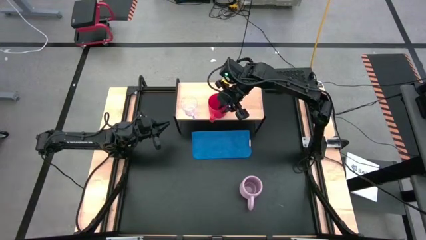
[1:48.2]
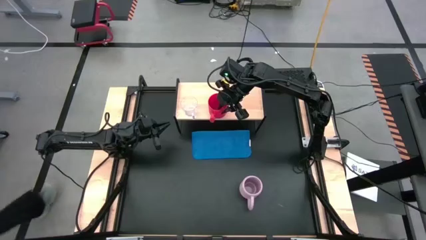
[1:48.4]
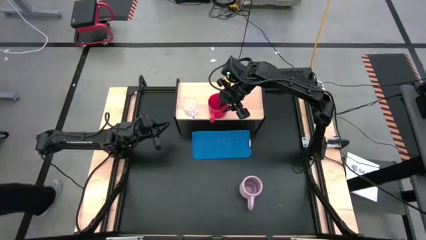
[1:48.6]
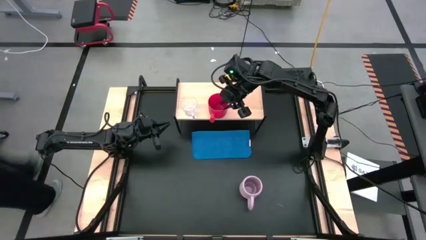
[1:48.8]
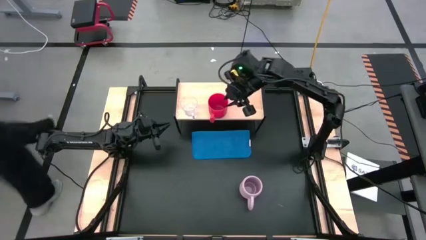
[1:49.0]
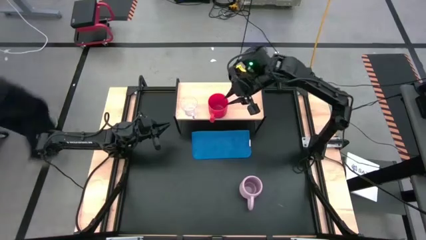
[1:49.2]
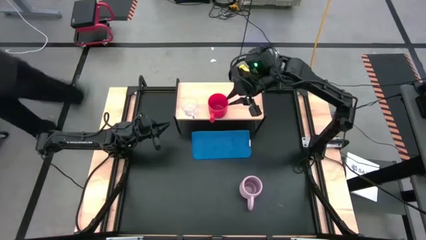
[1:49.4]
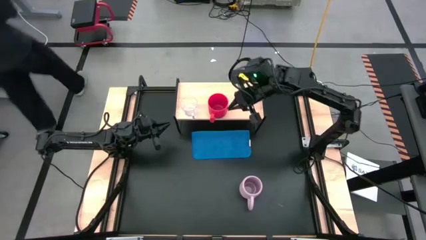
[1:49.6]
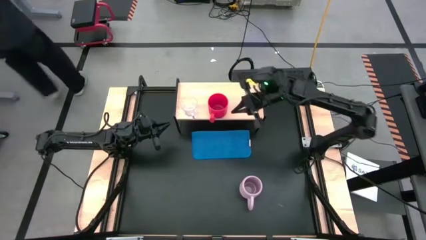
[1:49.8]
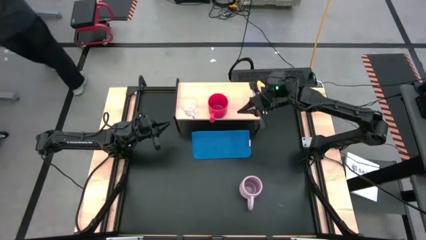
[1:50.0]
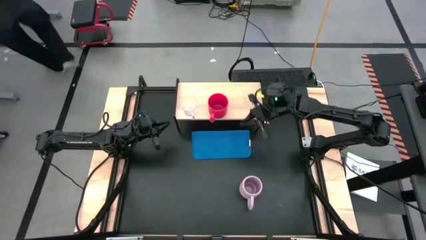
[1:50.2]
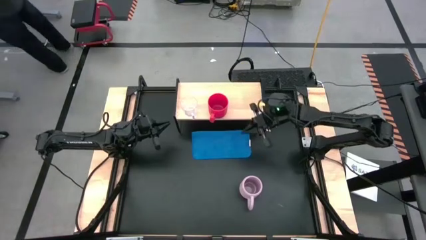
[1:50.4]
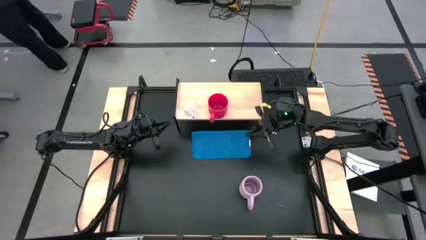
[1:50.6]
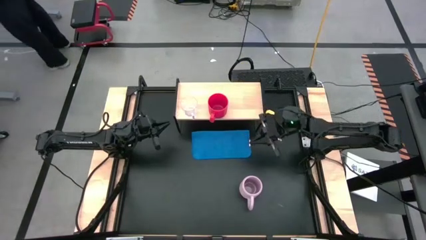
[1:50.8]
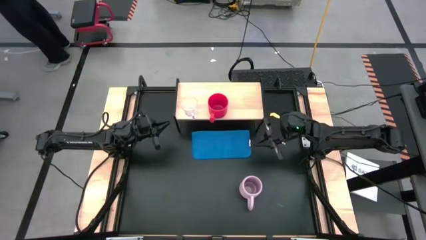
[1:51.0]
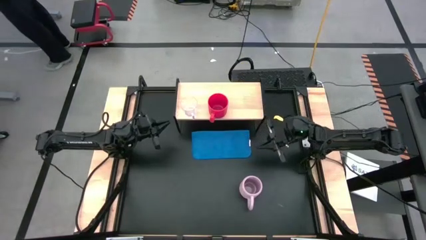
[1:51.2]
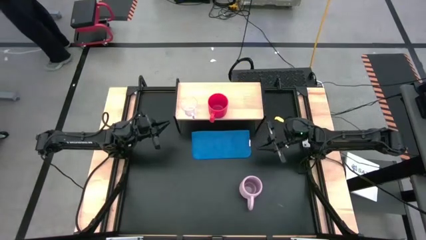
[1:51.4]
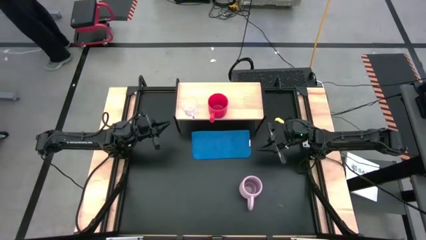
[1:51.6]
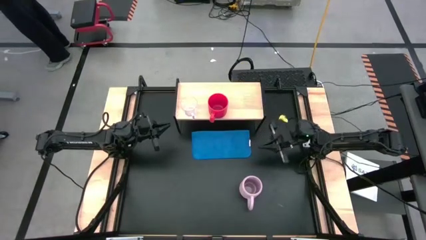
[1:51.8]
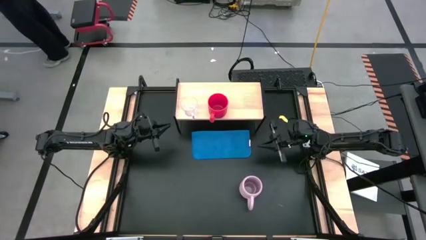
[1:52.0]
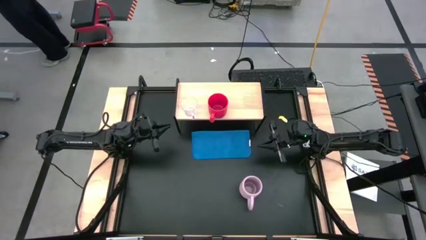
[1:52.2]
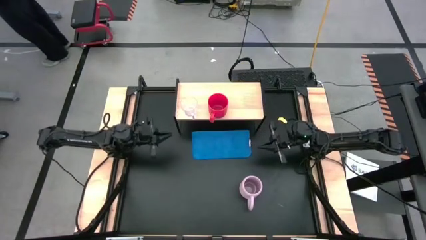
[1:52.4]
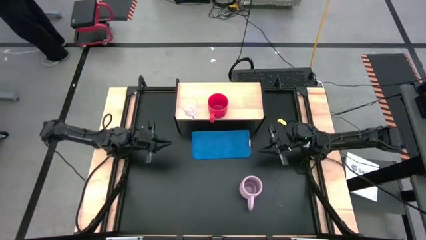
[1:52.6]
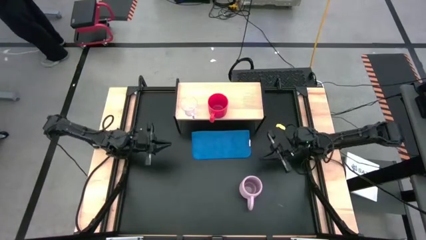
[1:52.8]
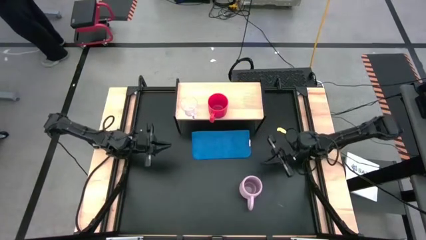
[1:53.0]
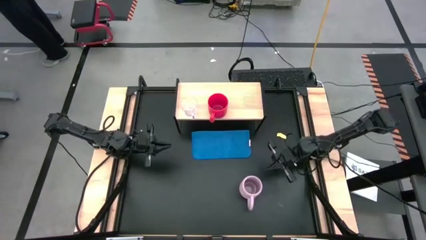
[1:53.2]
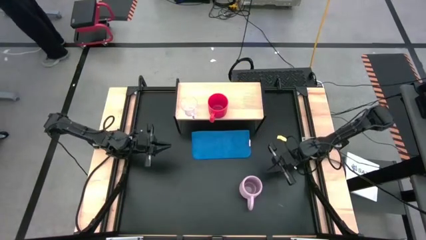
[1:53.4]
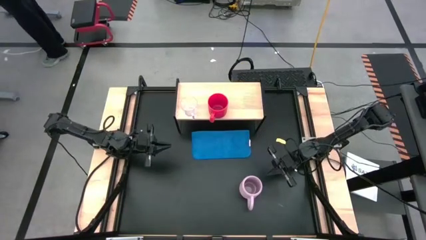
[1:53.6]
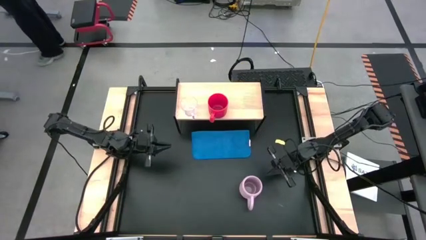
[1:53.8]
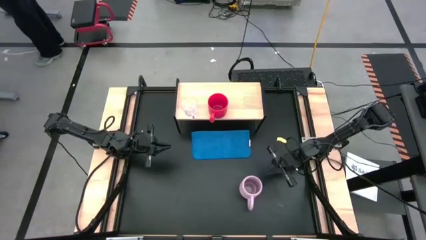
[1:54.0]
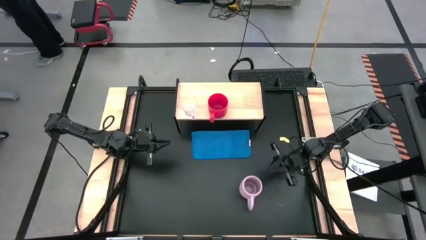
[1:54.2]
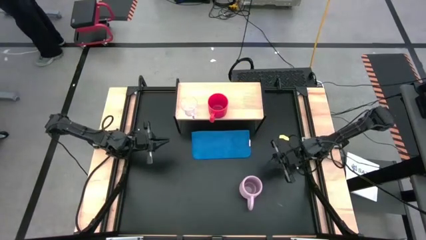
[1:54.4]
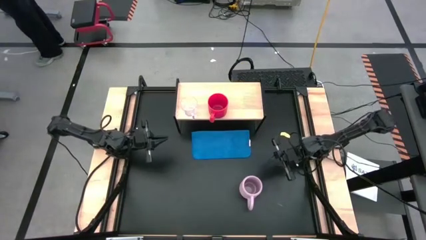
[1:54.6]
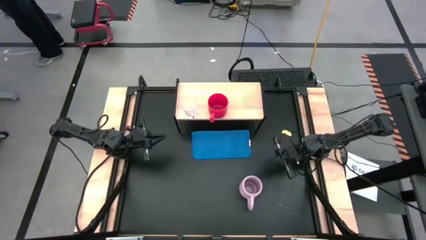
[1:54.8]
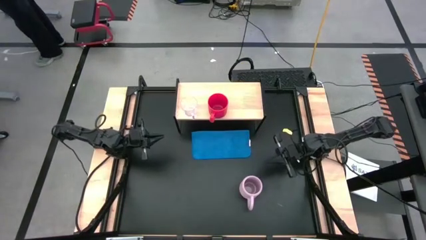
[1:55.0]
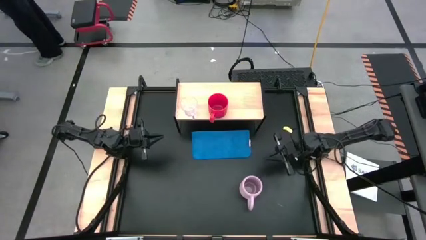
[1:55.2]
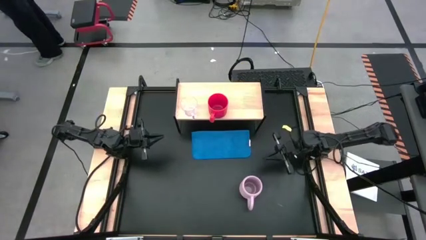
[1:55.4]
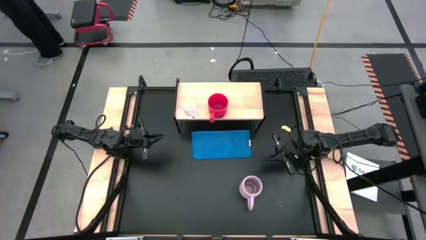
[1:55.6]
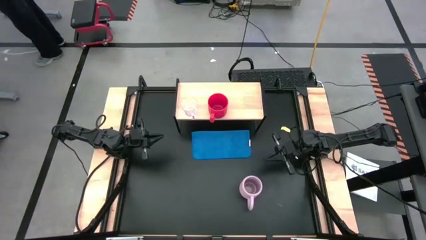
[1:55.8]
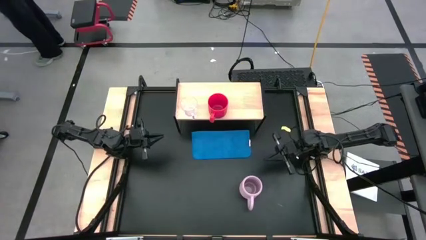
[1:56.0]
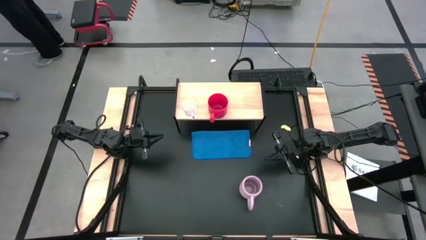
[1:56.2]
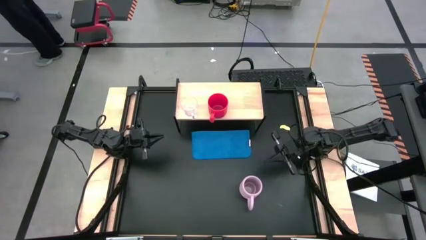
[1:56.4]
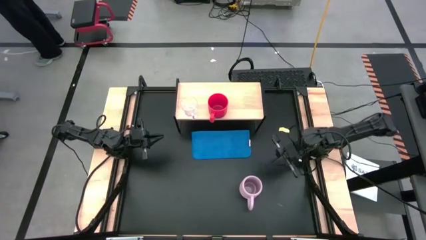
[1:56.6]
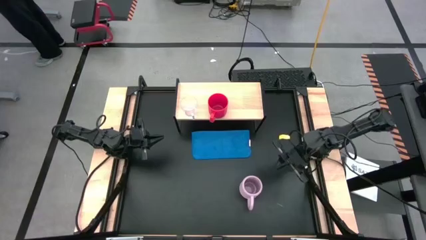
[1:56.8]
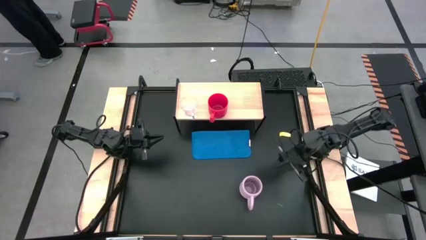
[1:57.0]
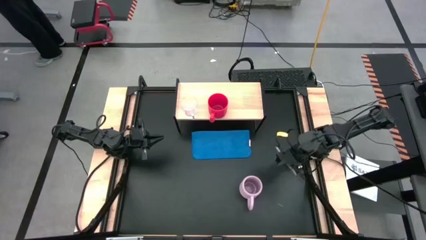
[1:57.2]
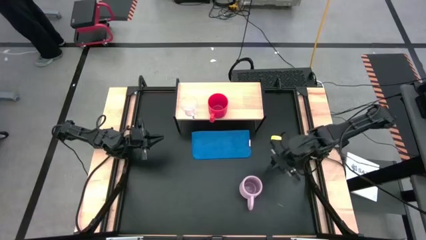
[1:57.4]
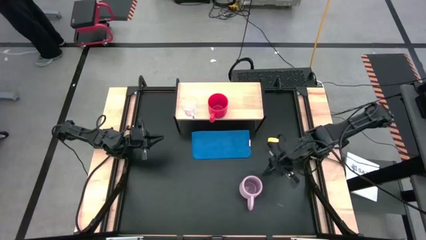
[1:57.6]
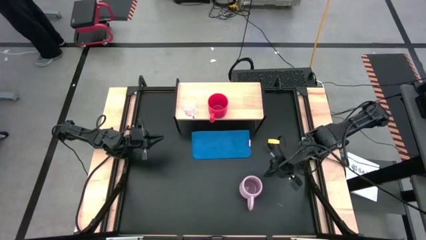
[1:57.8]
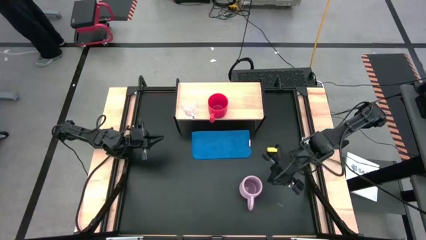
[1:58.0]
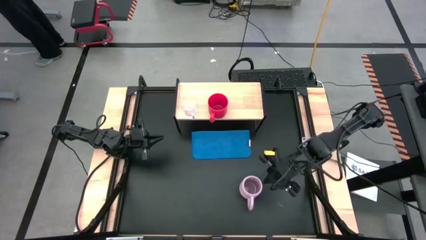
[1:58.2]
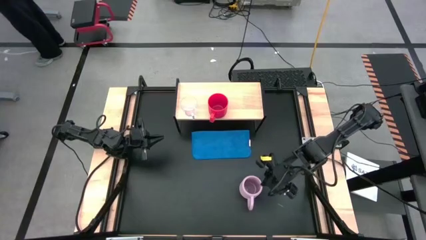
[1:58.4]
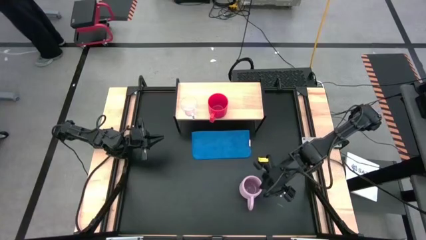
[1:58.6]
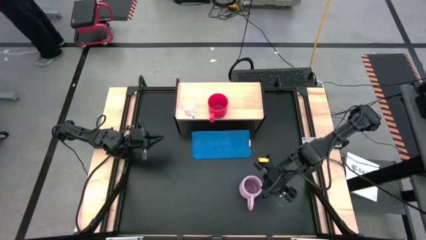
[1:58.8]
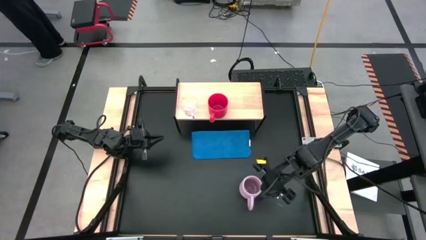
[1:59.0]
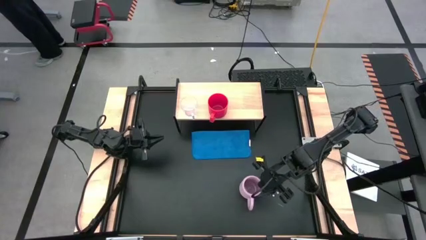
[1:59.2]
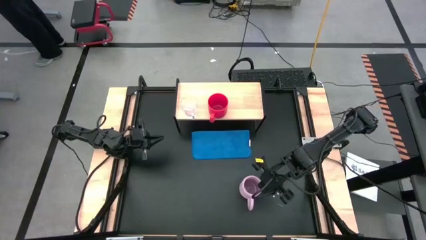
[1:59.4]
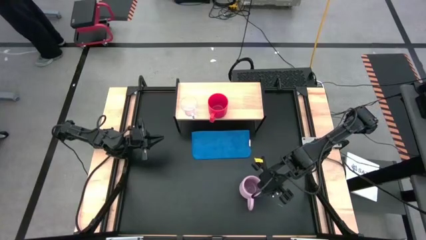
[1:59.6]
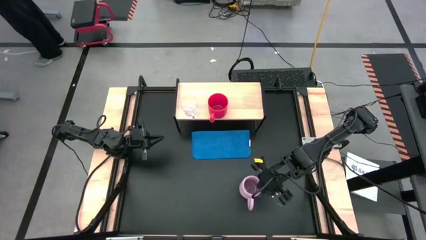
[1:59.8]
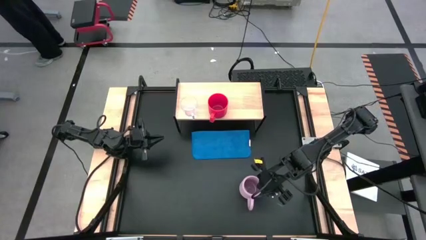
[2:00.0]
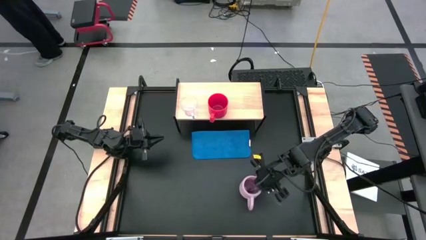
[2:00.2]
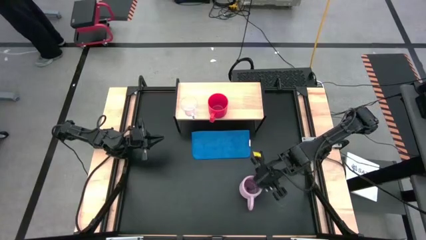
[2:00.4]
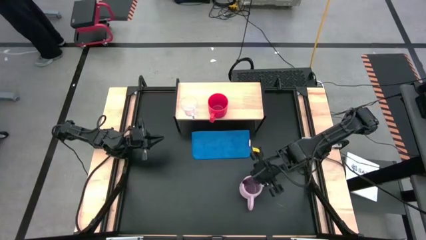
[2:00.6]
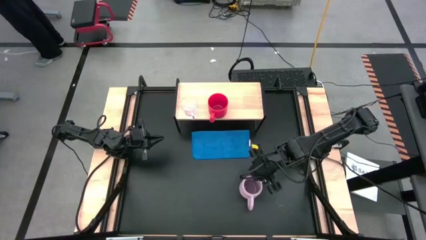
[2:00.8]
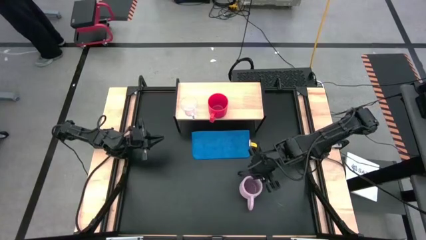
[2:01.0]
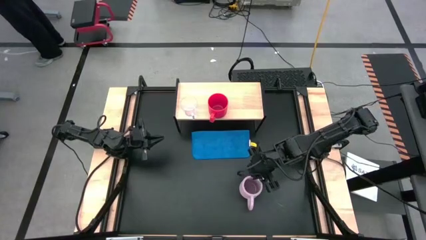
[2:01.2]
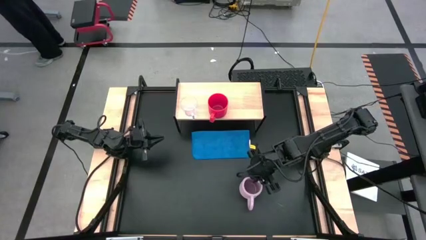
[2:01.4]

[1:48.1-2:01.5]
Task: Stack small to large cups/mugs on shelf
Put the purple mug on the shelf

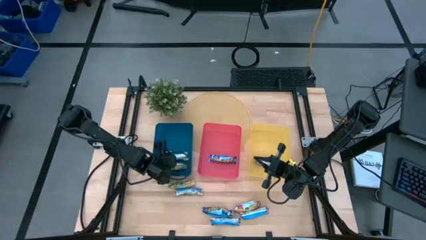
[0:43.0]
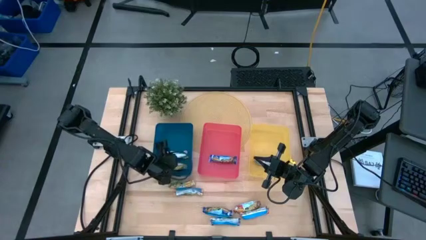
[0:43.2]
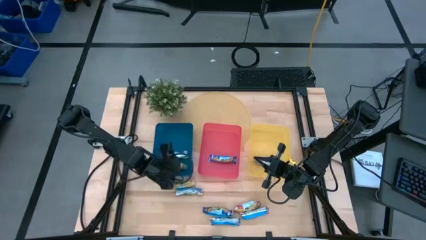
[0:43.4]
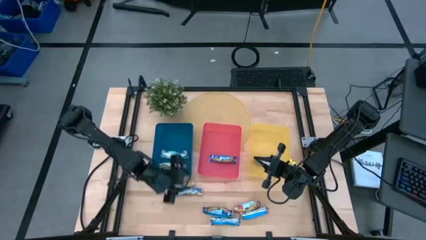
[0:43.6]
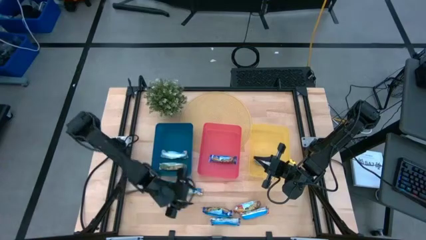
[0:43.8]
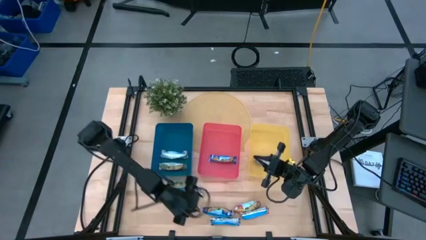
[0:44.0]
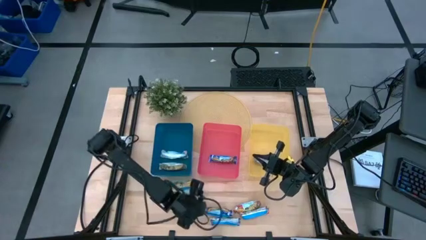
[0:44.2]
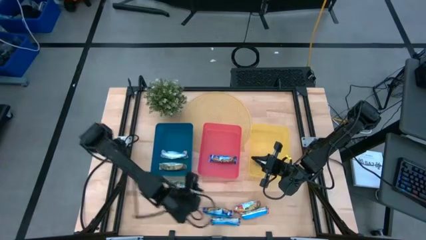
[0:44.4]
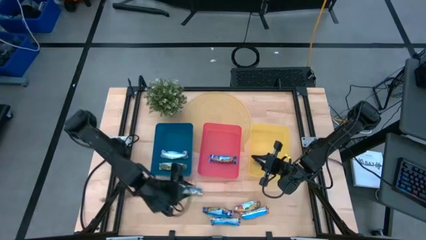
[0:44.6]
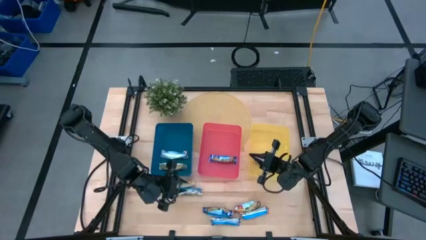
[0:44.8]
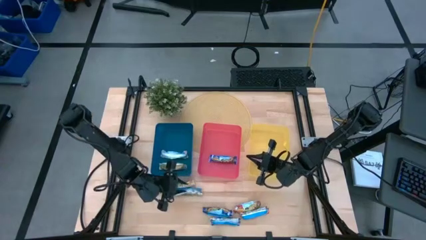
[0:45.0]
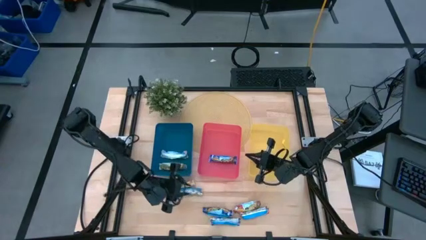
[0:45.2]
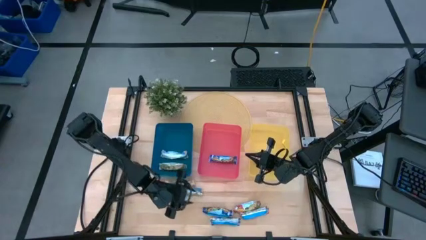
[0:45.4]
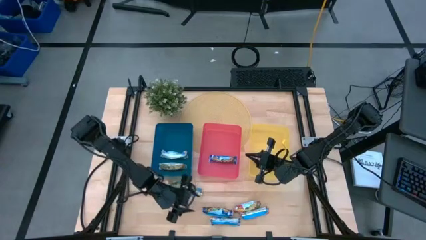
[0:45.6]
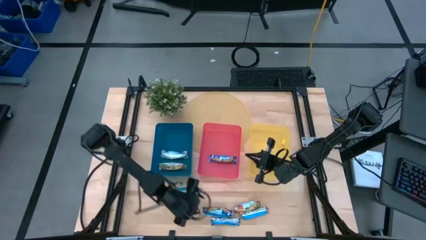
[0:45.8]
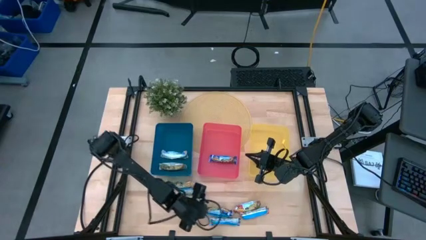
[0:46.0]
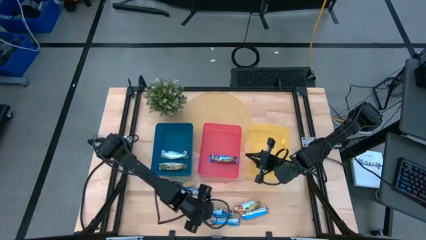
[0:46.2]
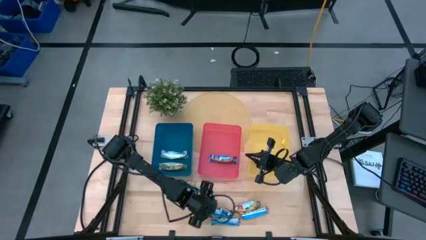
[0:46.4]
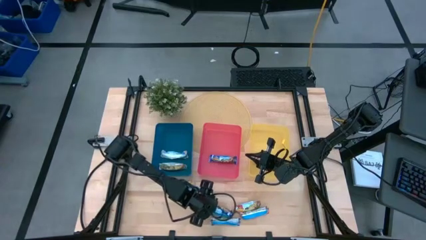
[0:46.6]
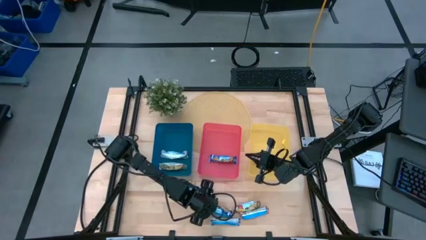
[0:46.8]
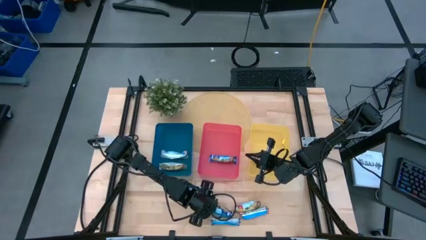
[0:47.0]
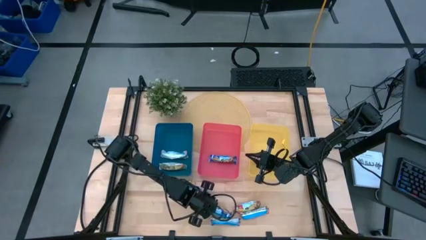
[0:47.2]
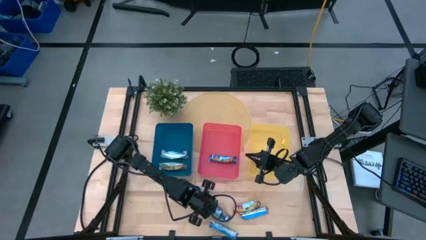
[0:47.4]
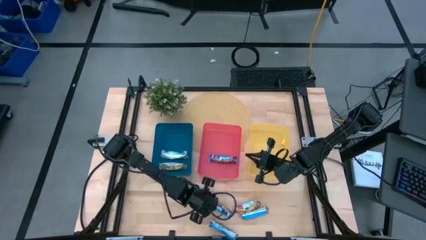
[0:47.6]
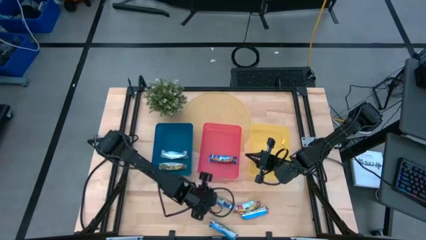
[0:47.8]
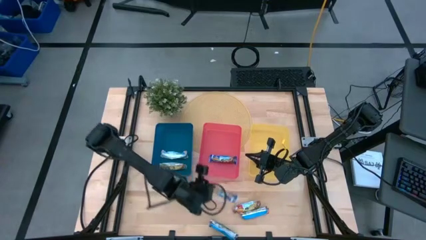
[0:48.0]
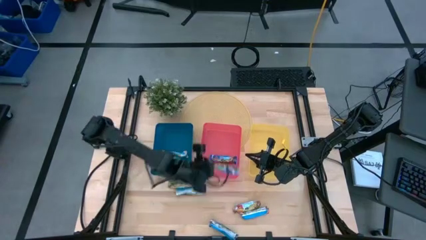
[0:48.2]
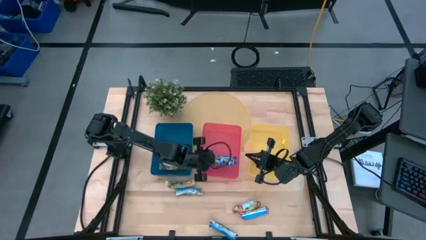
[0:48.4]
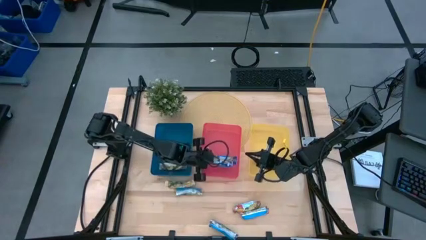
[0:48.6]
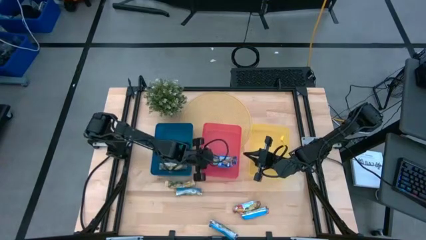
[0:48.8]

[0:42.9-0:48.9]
Task: Pick and place Granola Bars by type
Put the top blue granola bar into the red bin
